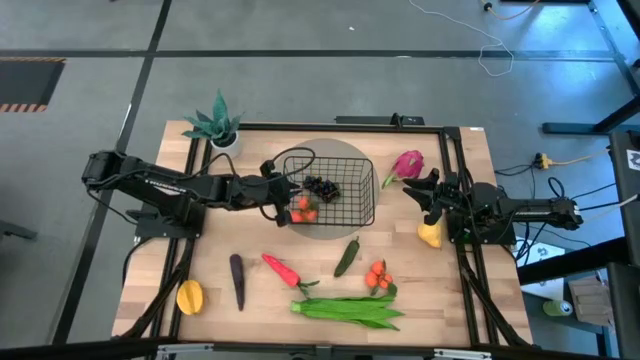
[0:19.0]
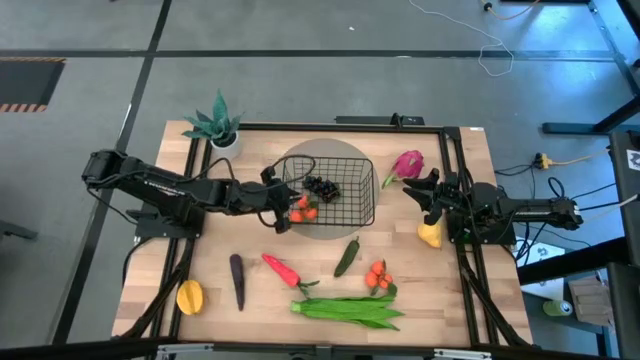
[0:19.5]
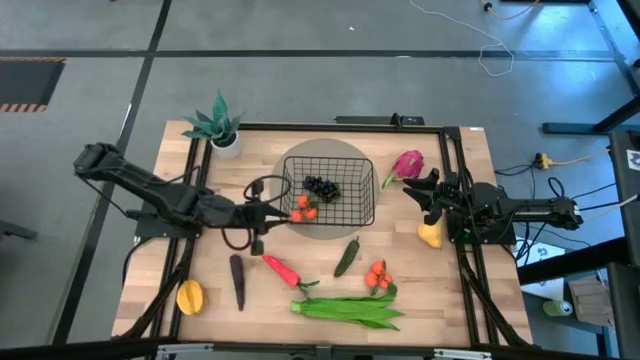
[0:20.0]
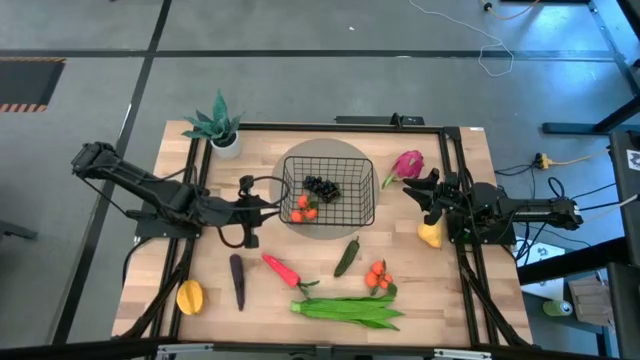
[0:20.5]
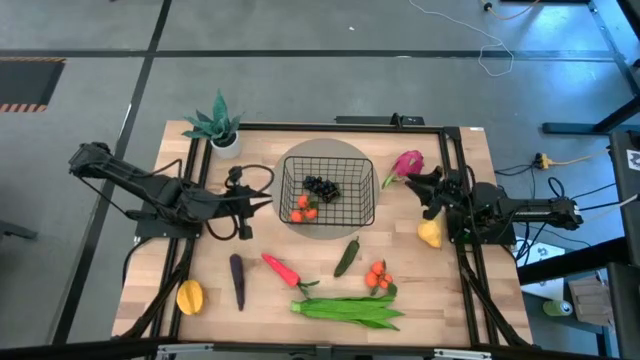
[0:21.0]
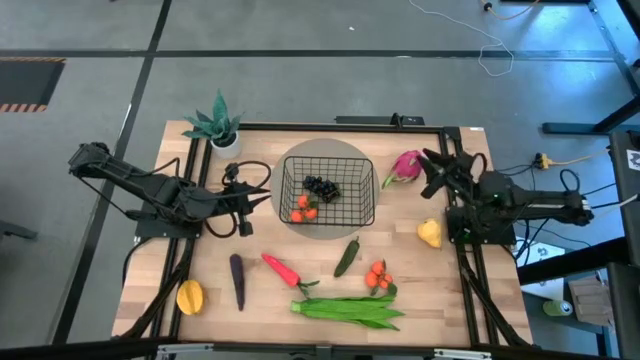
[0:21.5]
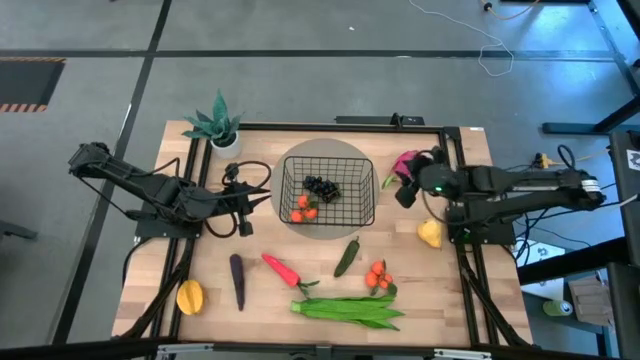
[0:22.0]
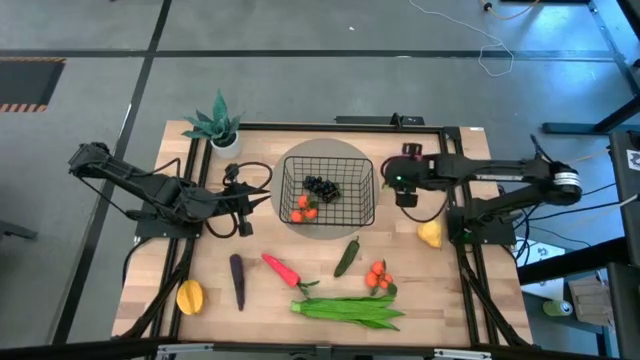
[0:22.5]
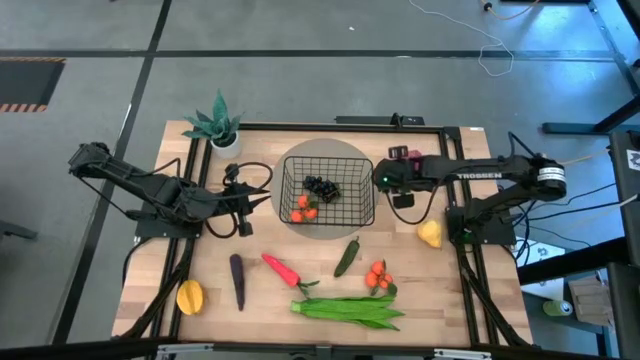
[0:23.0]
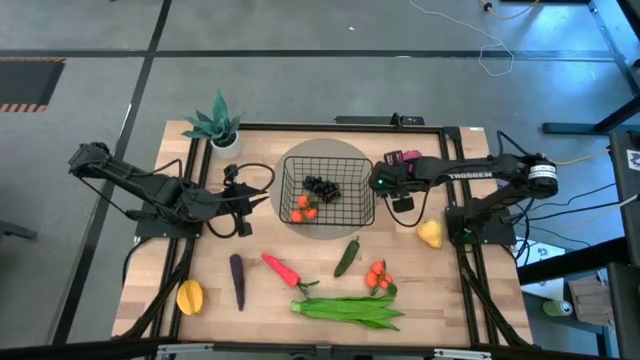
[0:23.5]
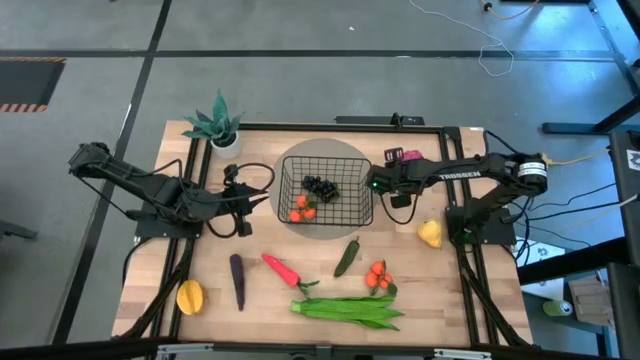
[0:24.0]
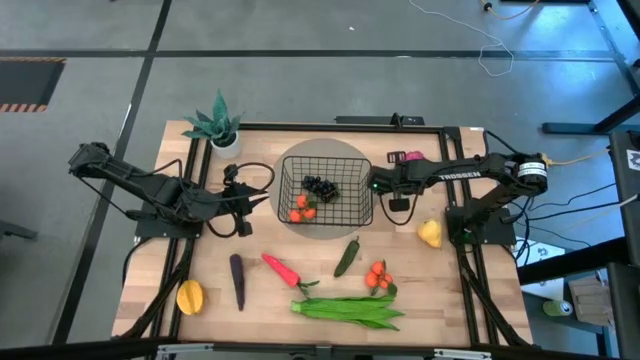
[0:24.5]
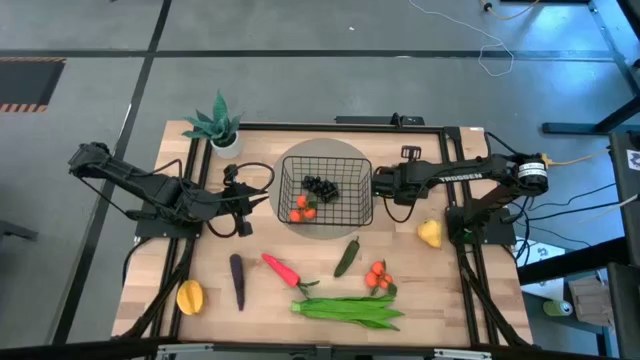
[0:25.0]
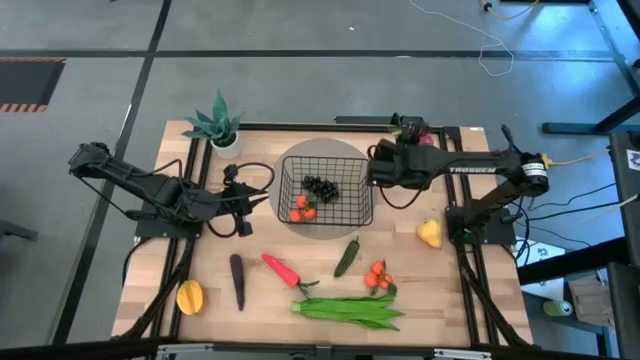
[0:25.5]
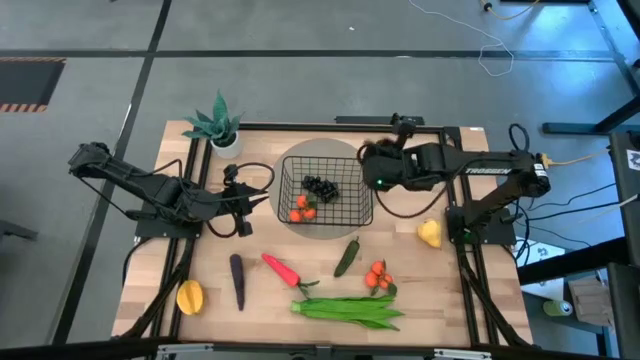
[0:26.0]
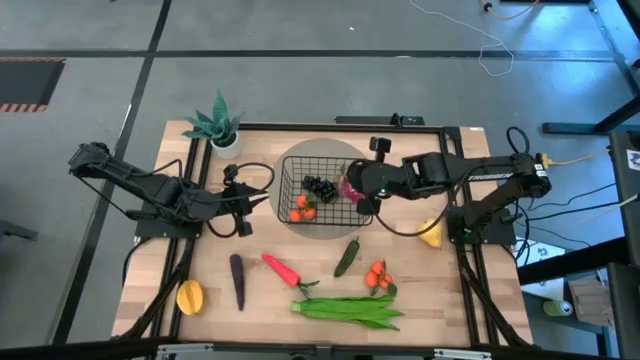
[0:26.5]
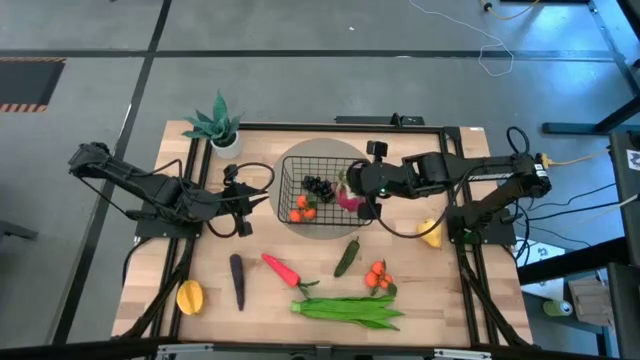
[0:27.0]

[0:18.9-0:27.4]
Task: Build produce basket
Put the dragon fruit into the black wire basket

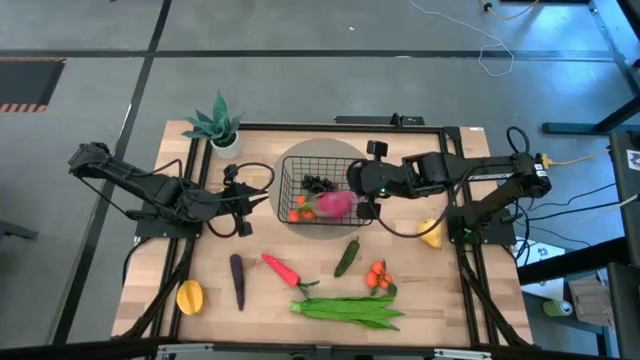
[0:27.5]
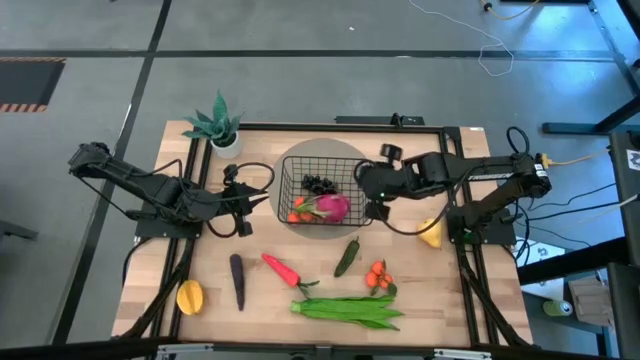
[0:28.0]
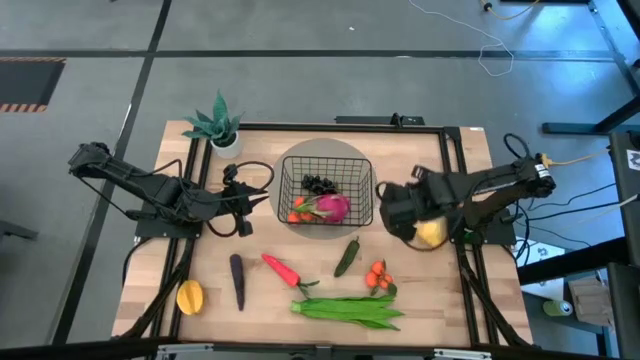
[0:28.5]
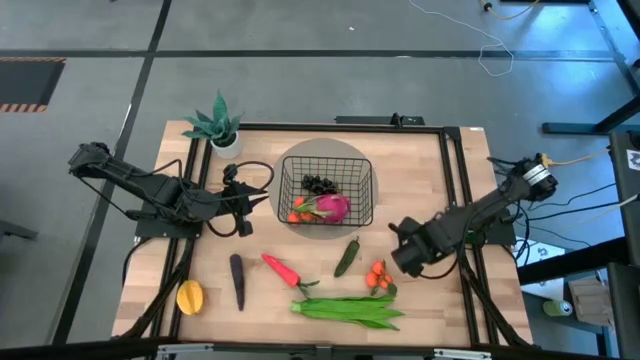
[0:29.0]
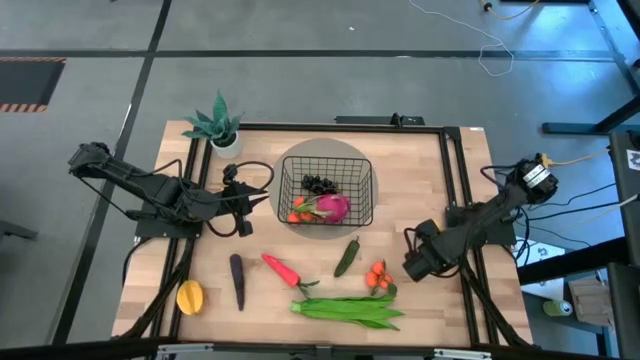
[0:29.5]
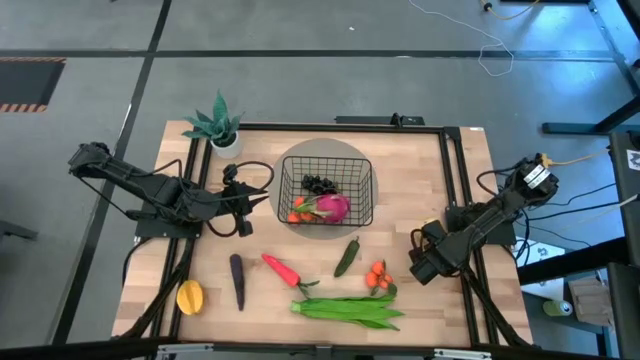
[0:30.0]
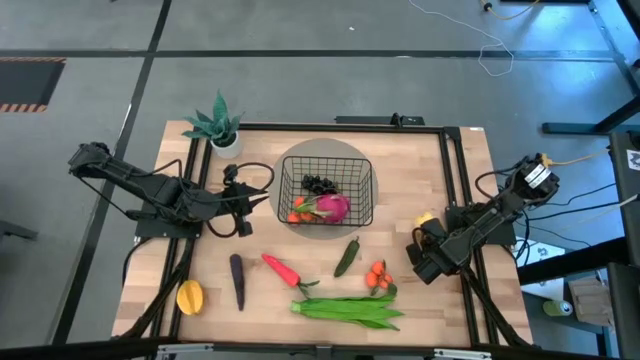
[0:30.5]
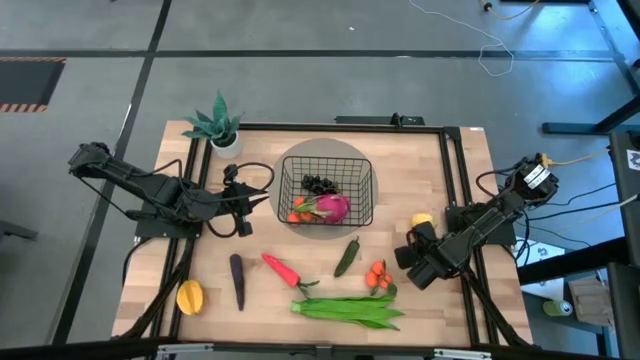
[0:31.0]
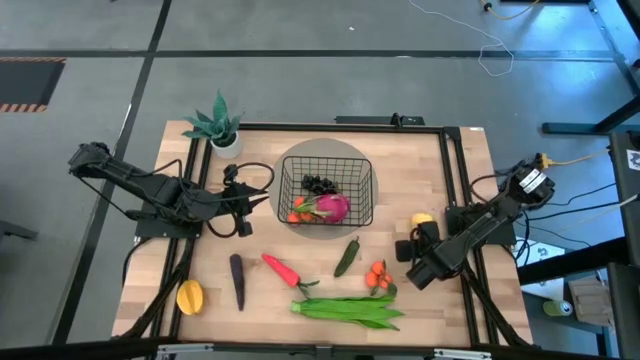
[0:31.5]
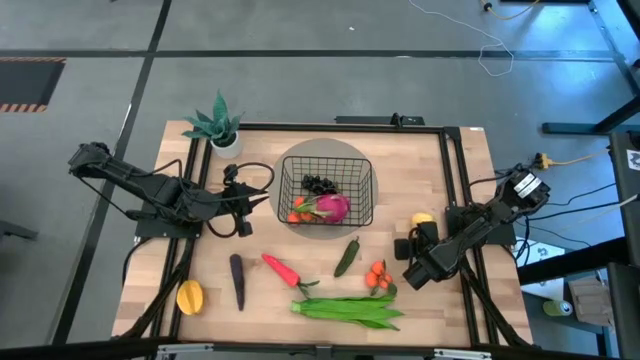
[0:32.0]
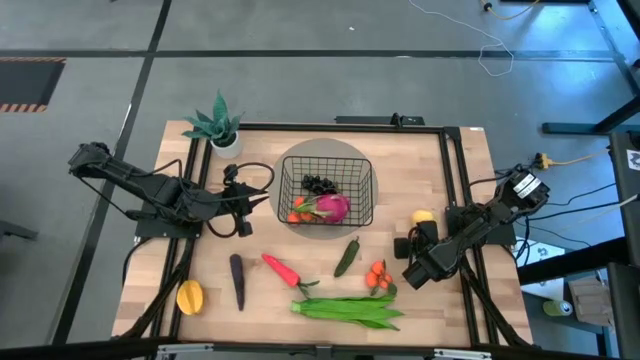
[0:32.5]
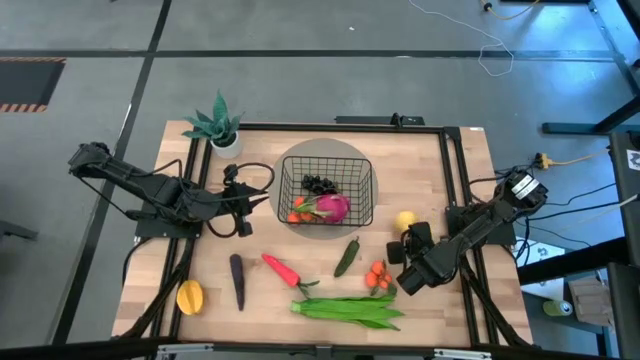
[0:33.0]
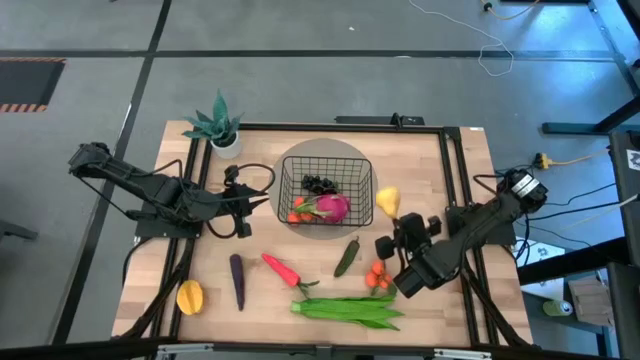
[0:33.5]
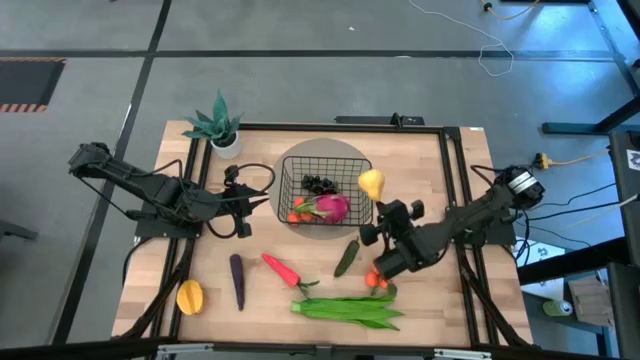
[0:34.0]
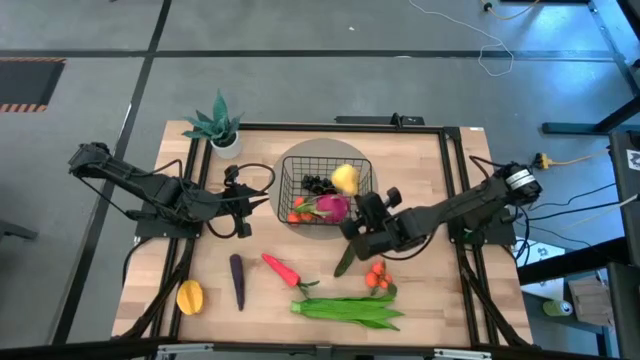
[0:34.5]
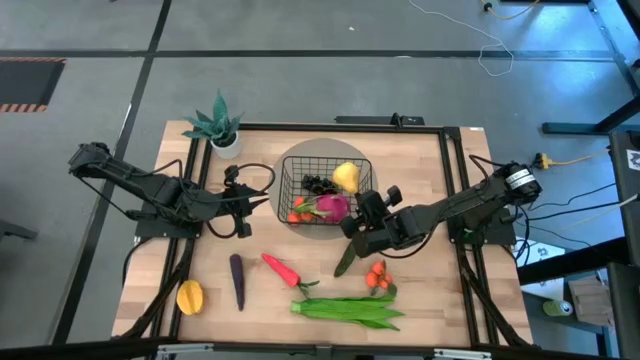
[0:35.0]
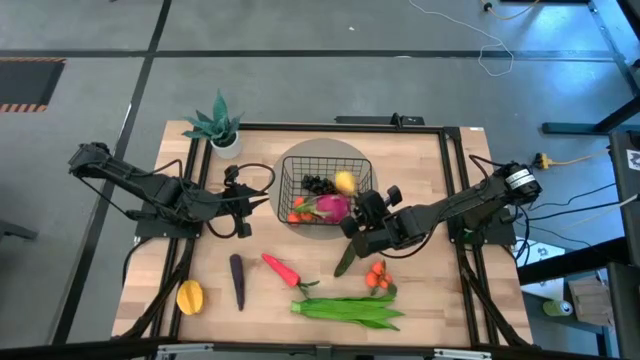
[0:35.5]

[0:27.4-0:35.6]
Put the pear into the black wire basket

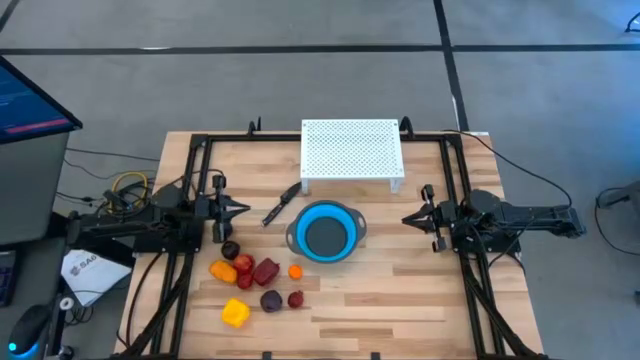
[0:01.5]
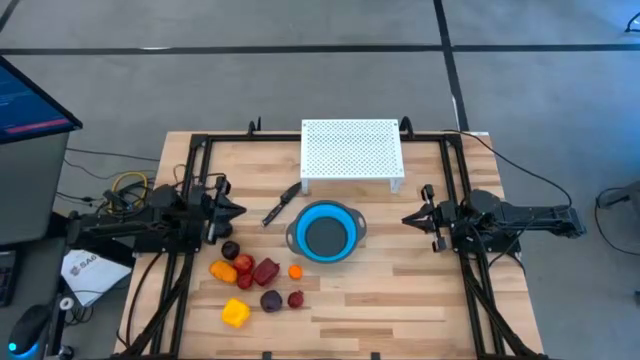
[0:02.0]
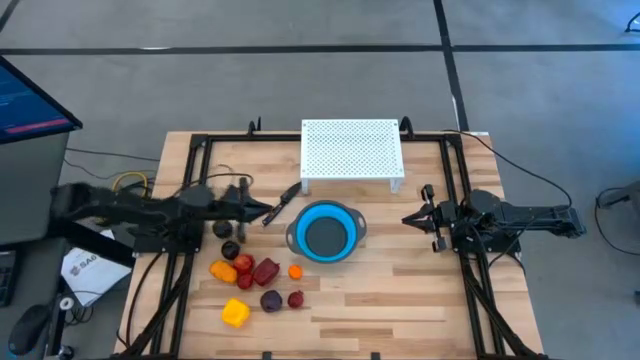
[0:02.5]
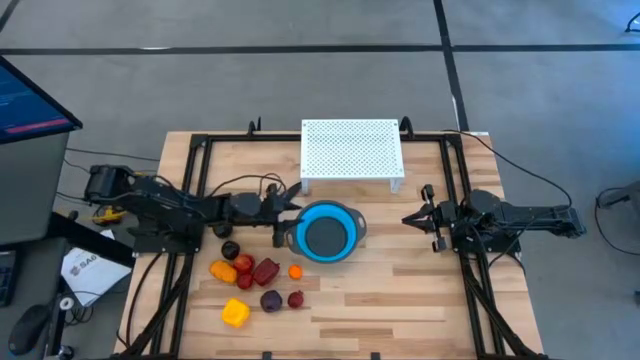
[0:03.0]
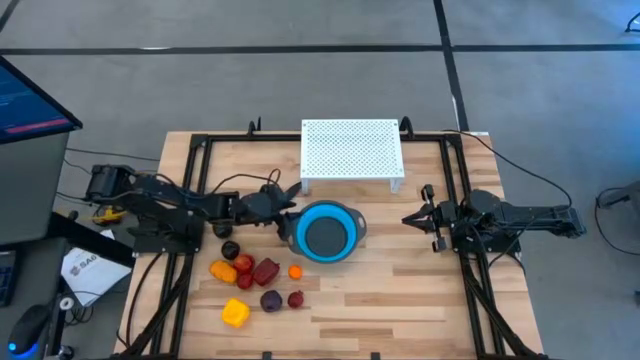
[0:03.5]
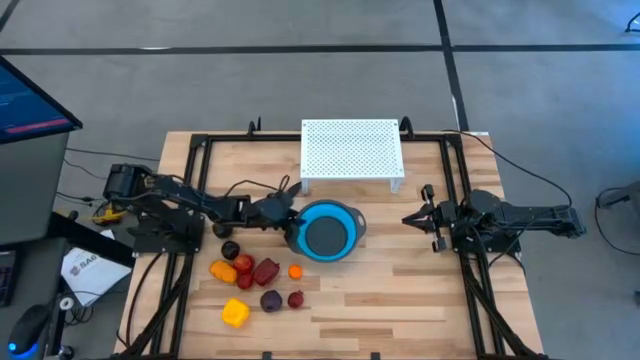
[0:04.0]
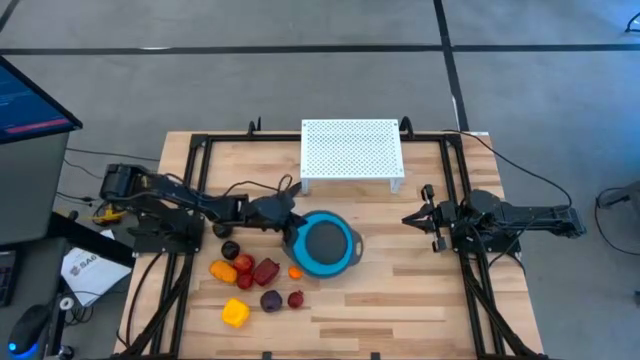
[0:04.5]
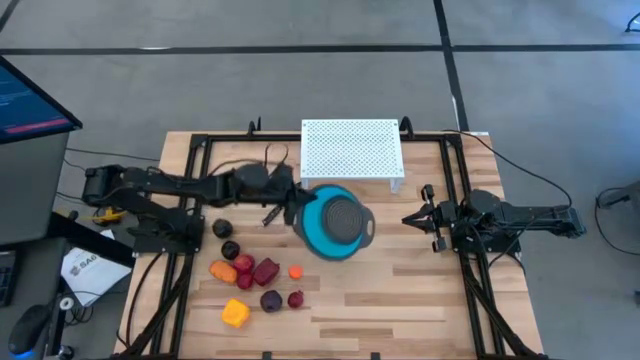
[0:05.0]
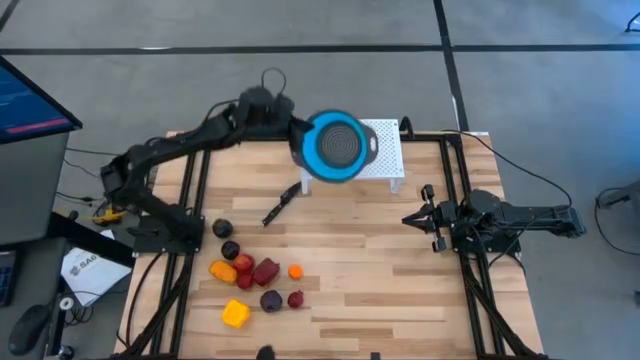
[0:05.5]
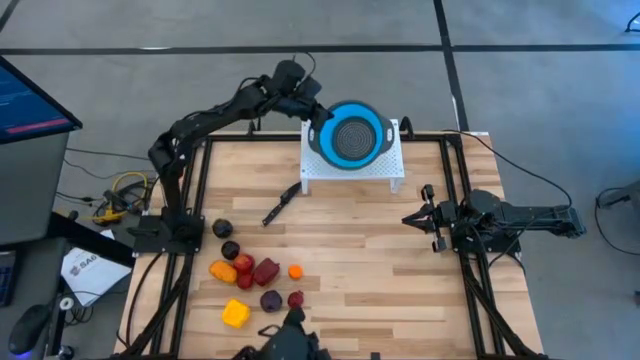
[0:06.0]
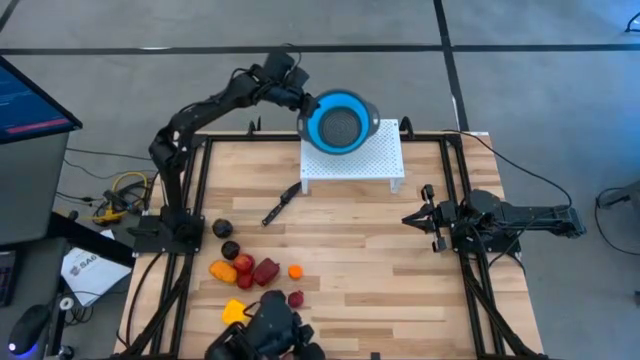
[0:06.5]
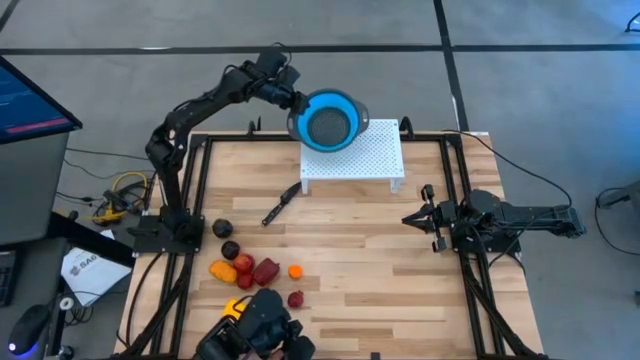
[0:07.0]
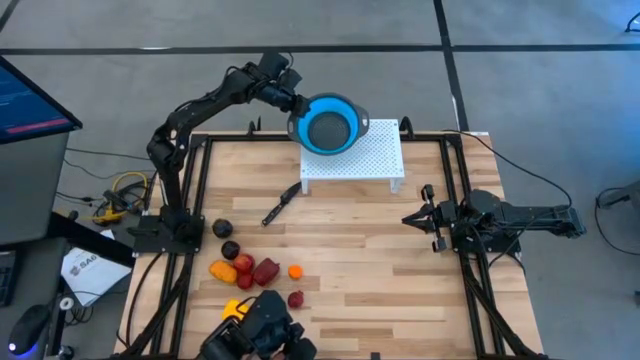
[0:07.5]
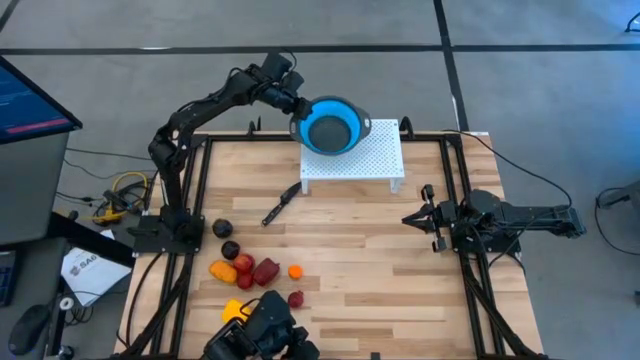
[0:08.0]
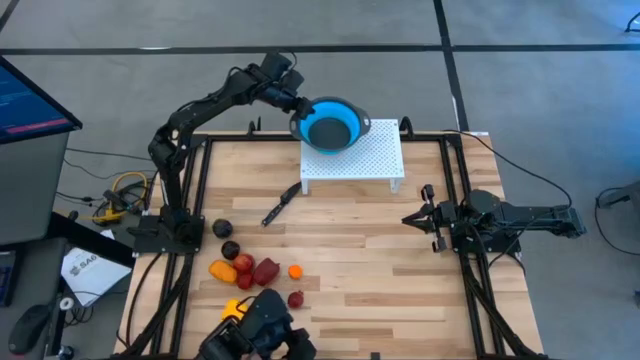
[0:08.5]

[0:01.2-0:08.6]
Task: Pick & Place Fruit
Put the blue strainer bowl on the shelf
